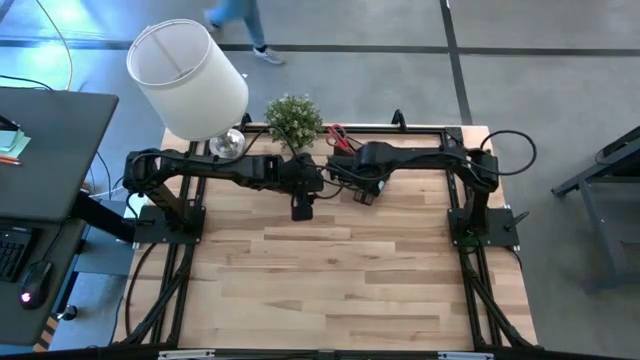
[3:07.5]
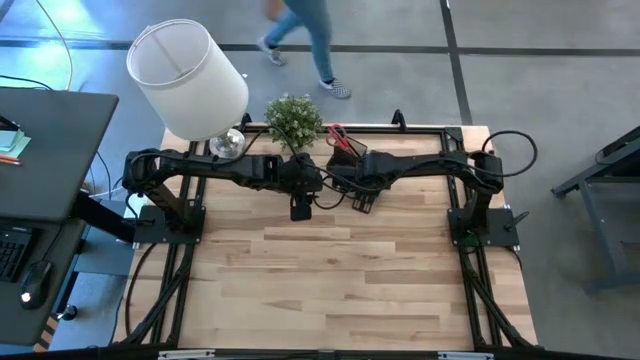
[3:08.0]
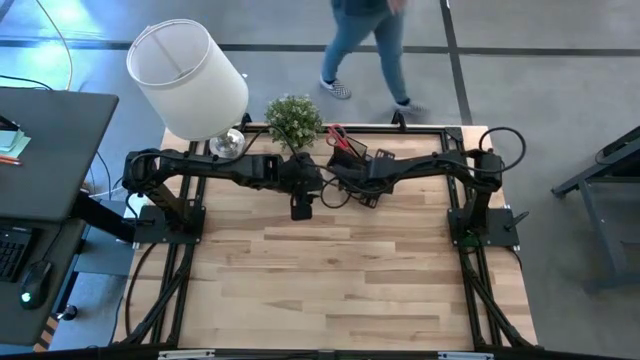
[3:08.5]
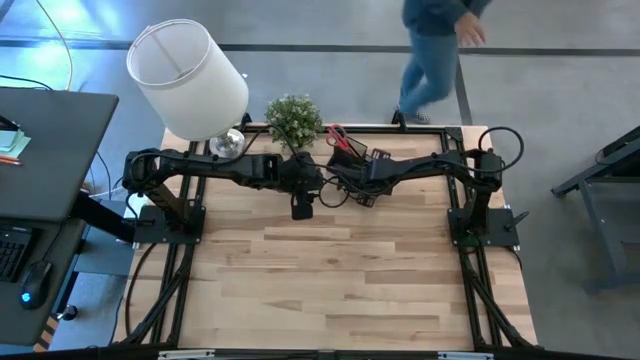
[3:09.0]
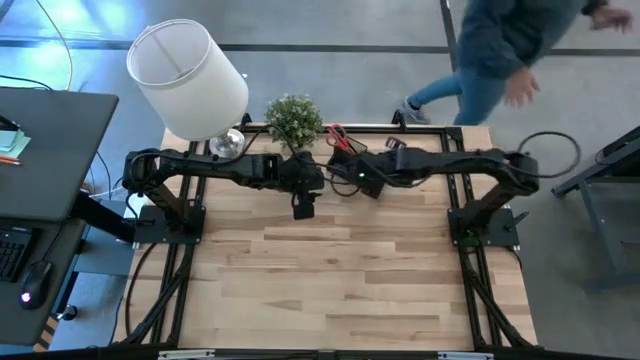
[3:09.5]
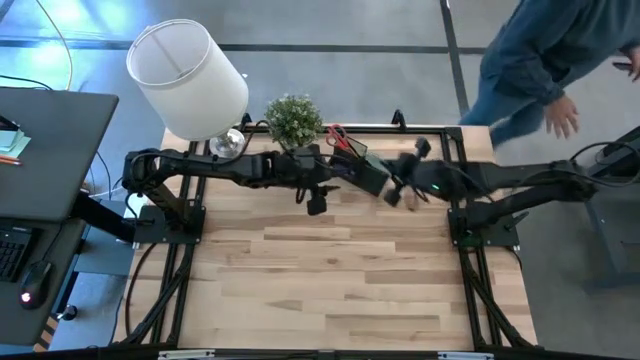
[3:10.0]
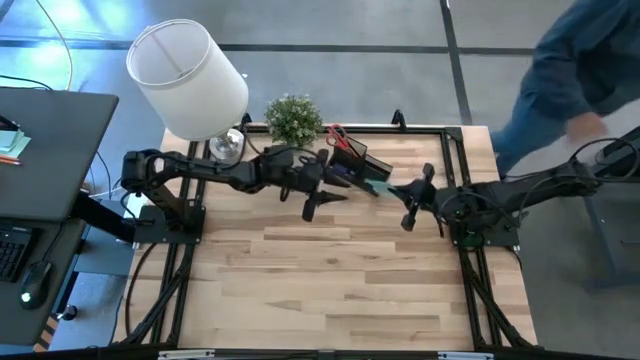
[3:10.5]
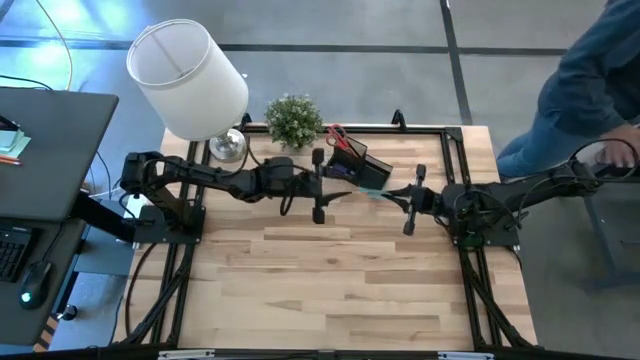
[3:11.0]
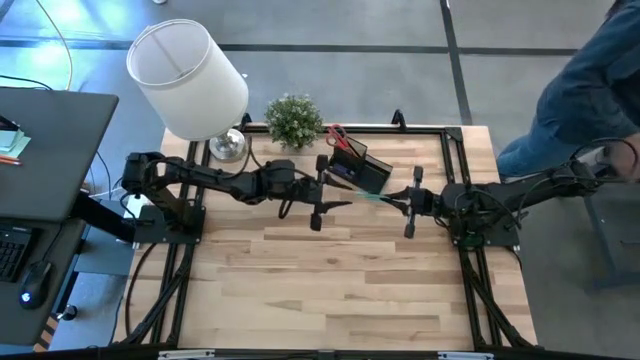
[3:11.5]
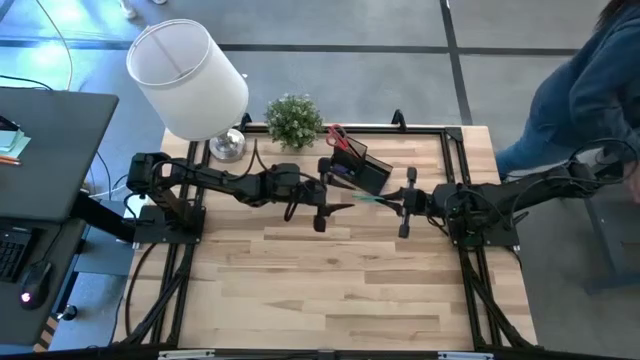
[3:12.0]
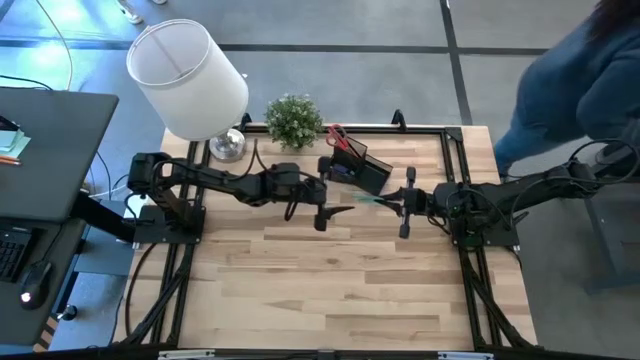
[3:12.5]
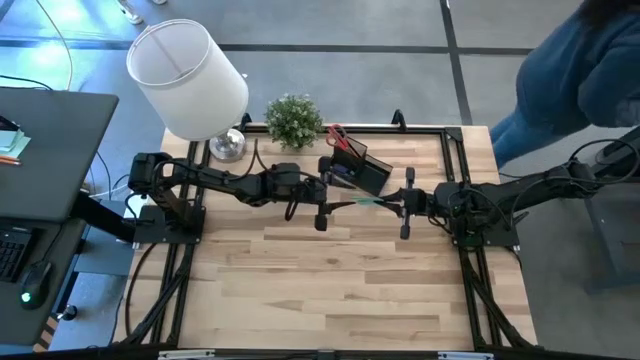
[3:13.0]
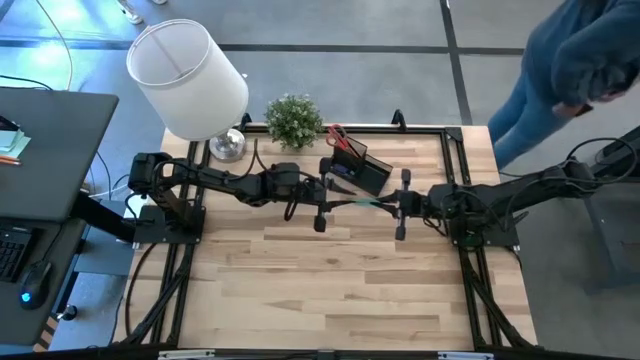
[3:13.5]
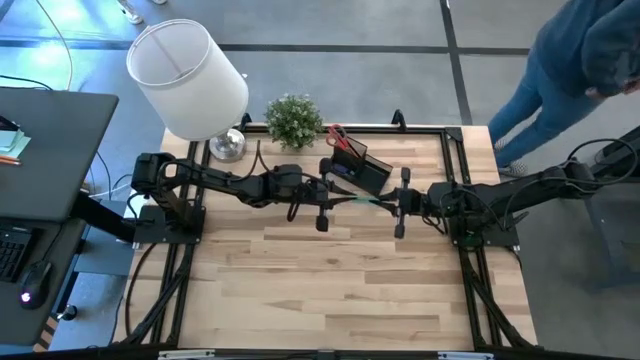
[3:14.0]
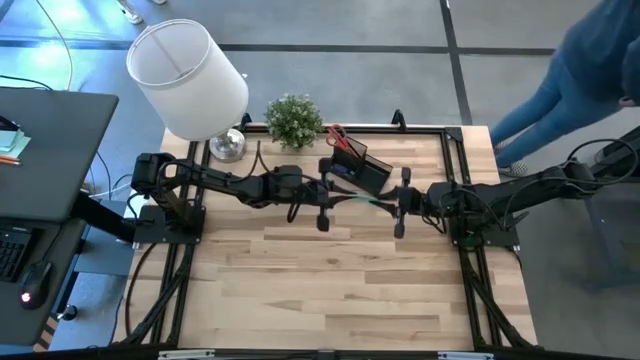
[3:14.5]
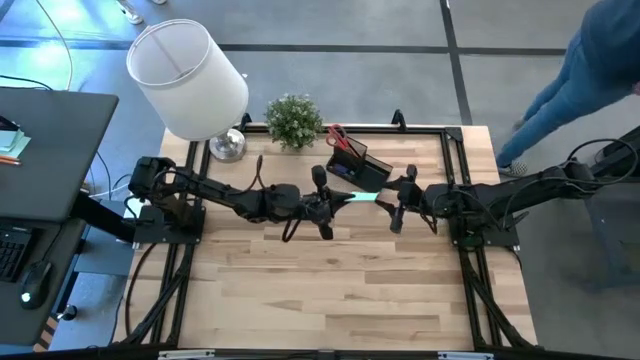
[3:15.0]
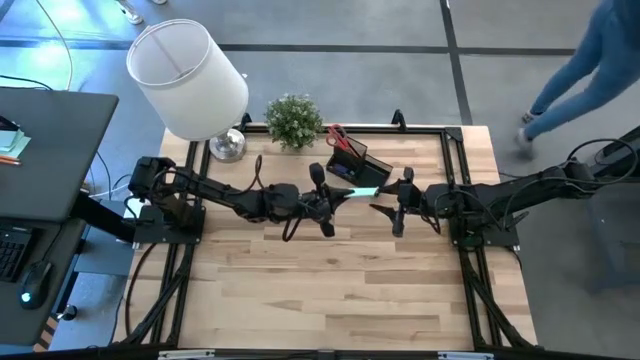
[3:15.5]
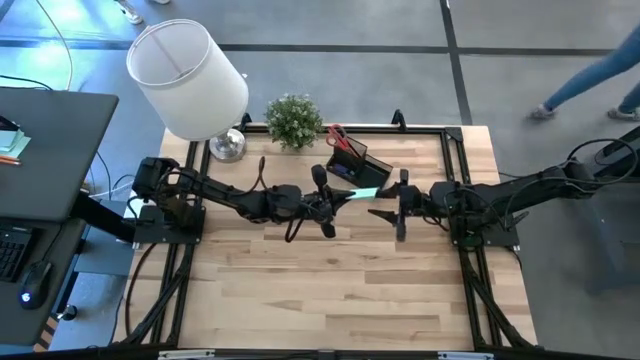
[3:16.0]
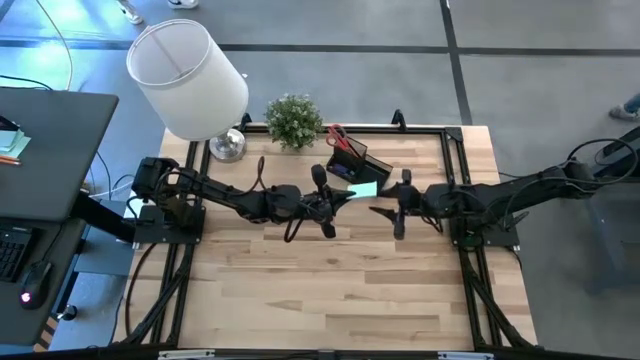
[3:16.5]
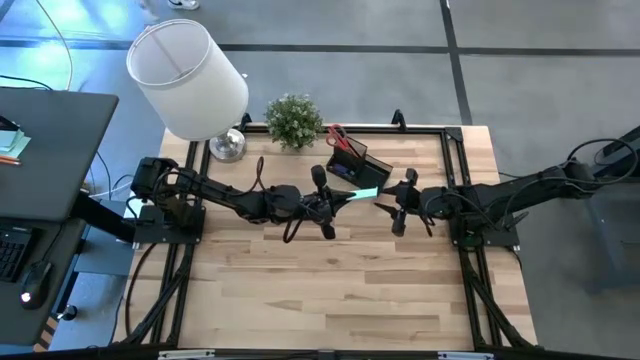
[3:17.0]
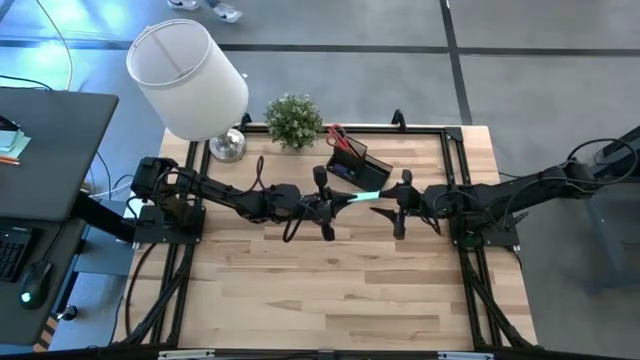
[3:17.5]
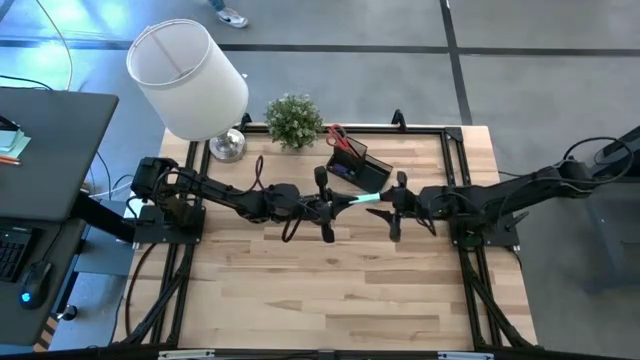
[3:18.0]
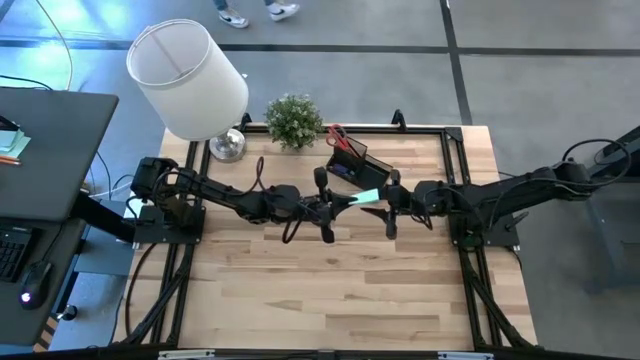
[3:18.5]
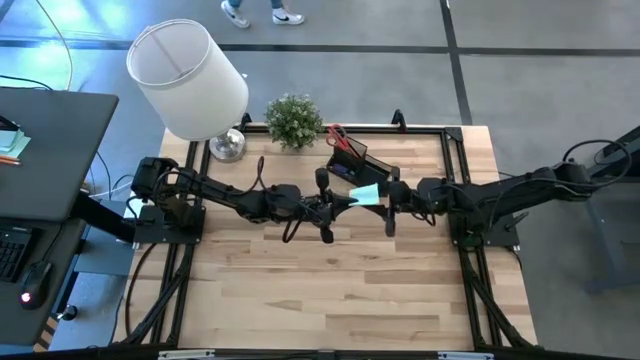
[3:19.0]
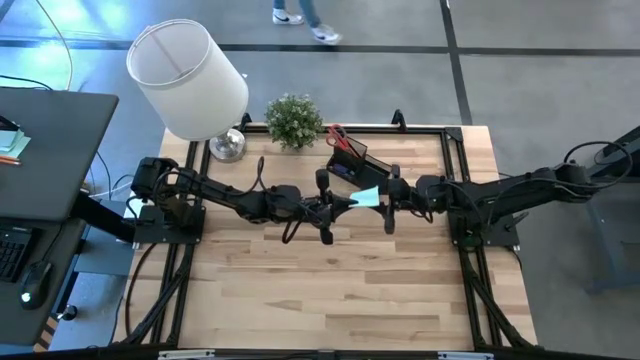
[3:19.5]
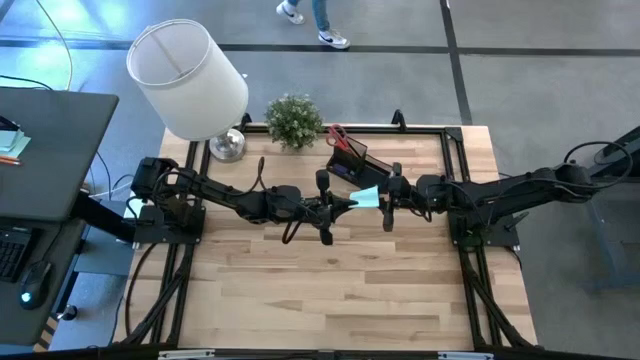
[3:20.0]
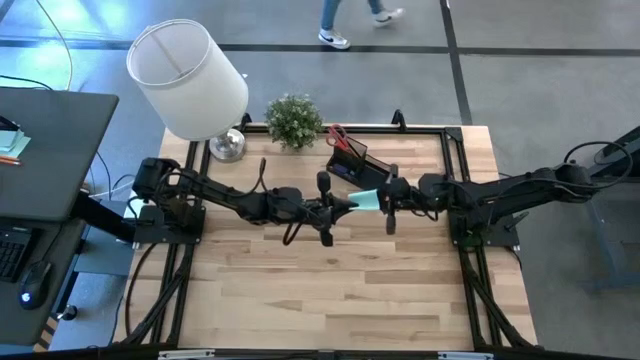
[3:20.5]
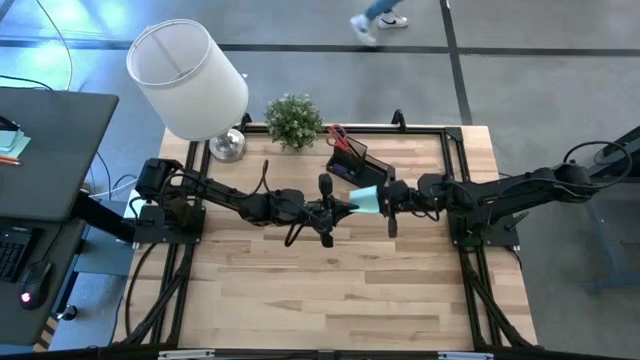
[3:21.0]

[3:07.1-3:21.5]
Task: Pick and place office supplies into organizer
Put the blue sticky notes in the black desk organizer

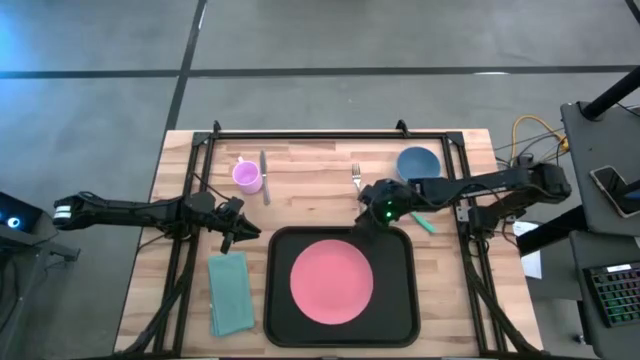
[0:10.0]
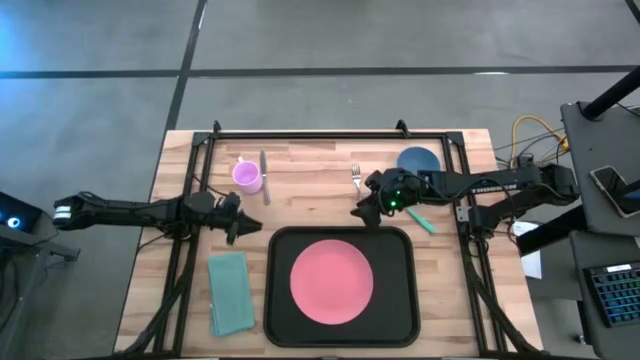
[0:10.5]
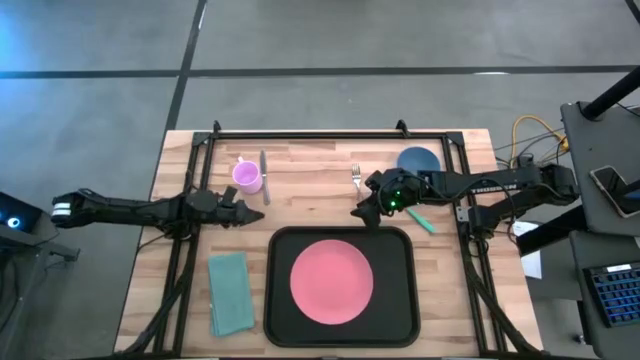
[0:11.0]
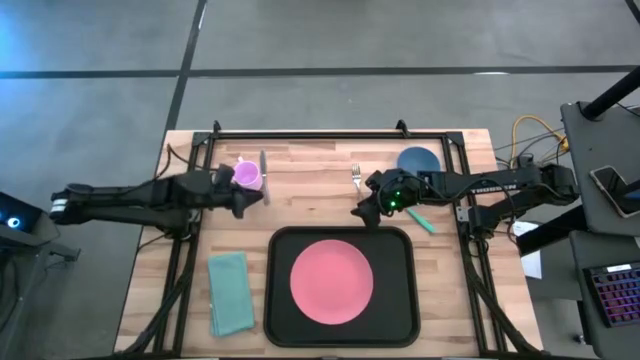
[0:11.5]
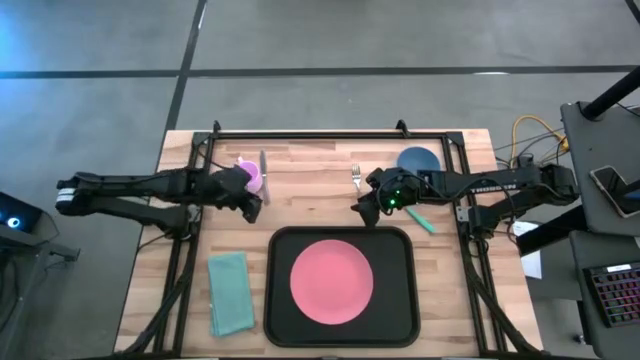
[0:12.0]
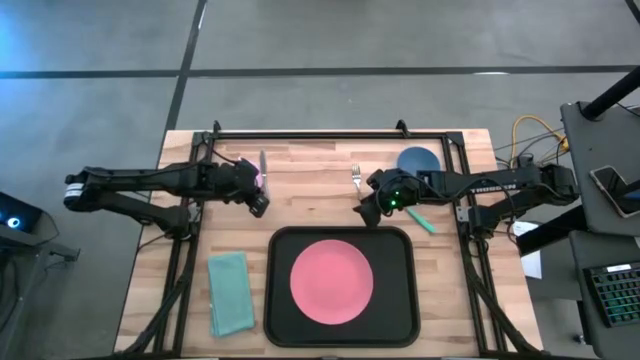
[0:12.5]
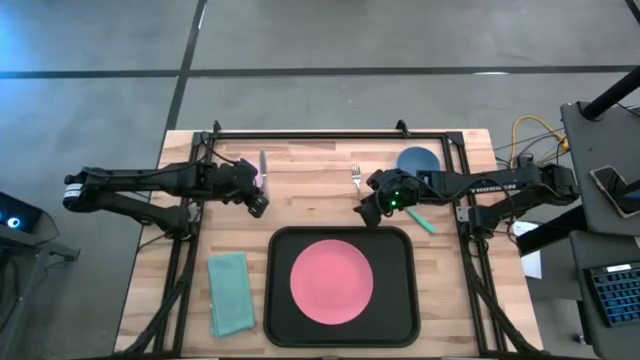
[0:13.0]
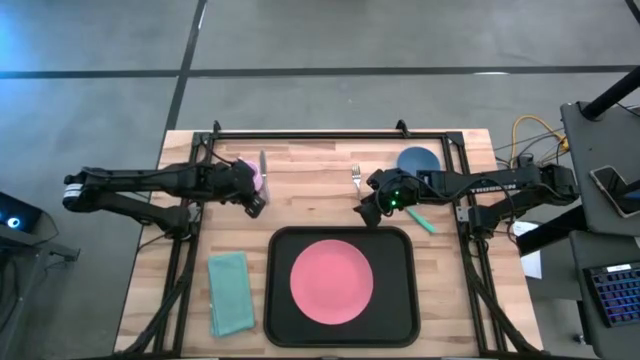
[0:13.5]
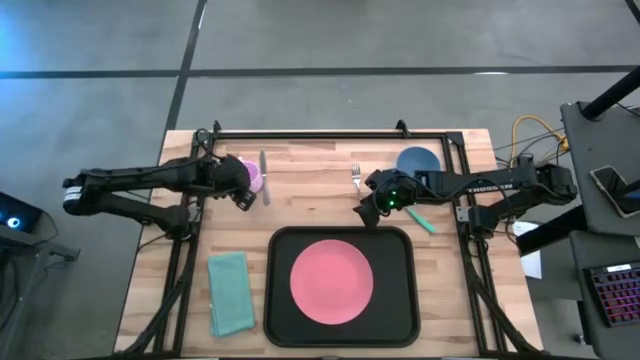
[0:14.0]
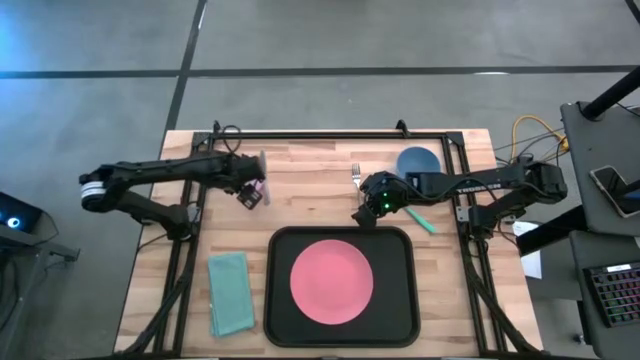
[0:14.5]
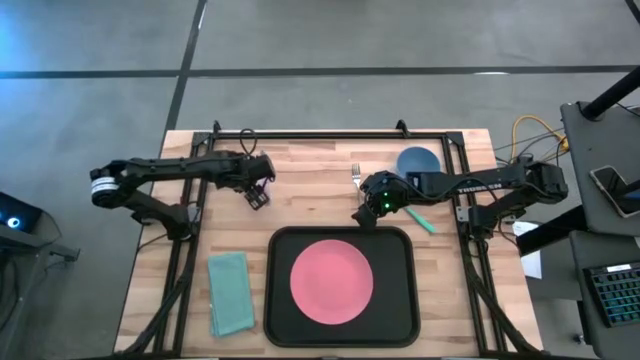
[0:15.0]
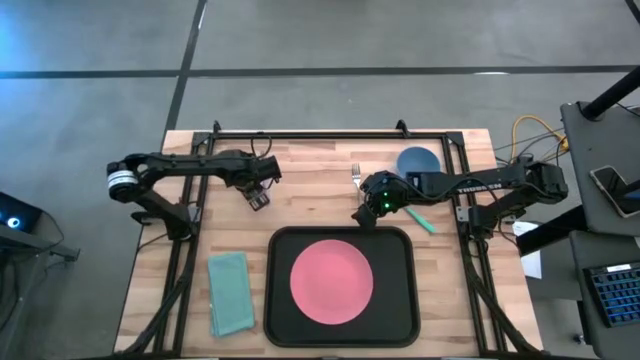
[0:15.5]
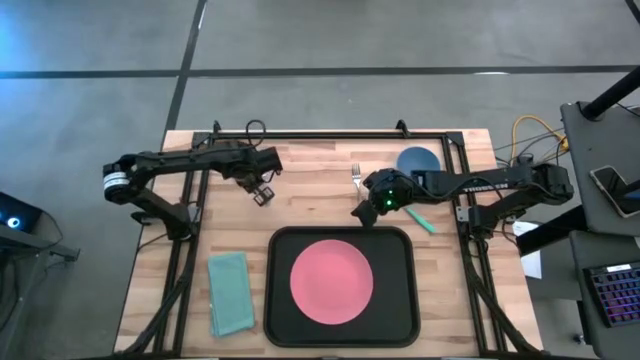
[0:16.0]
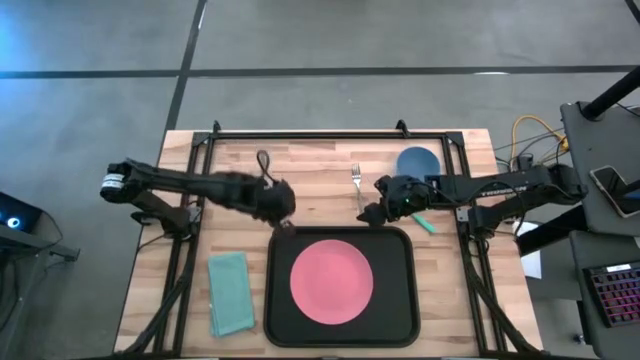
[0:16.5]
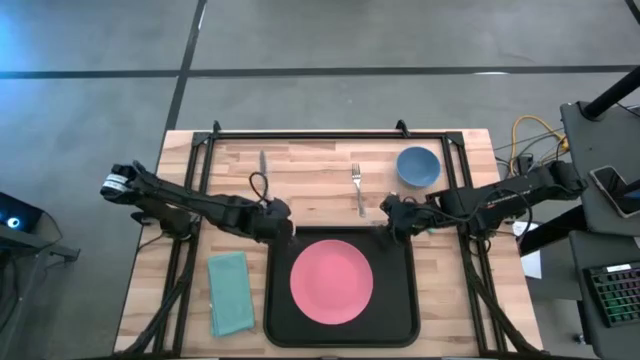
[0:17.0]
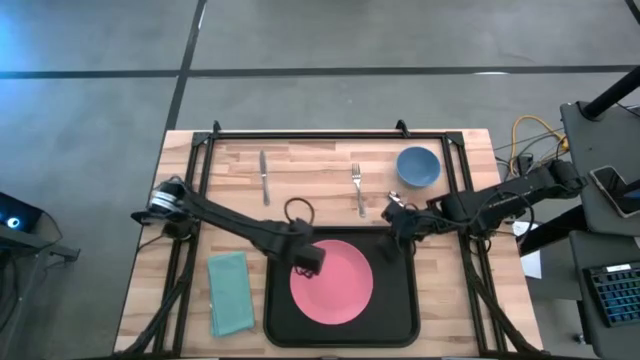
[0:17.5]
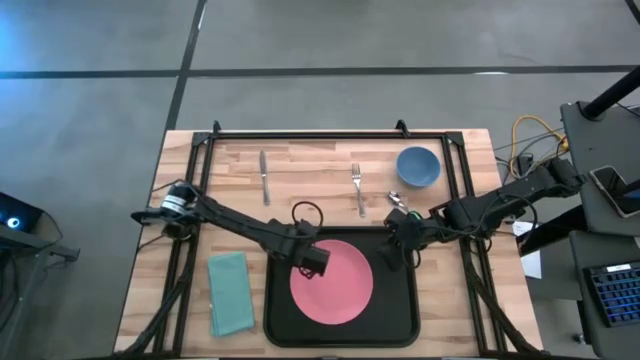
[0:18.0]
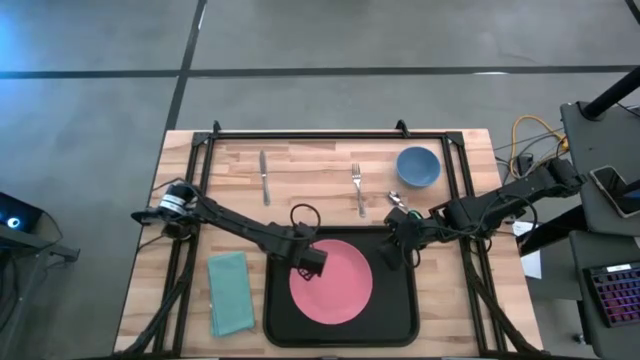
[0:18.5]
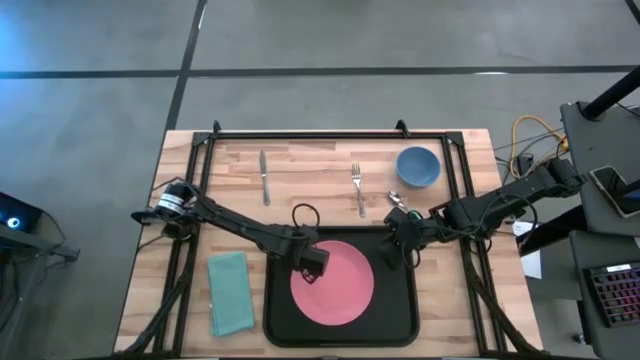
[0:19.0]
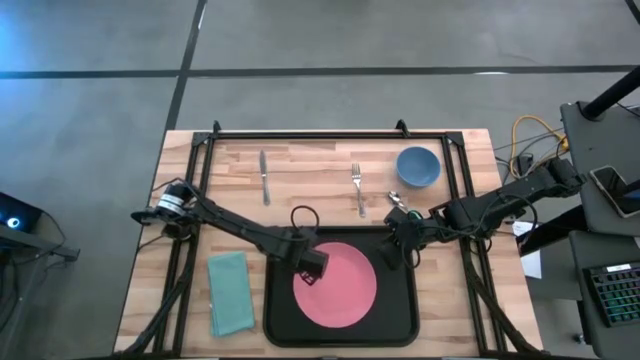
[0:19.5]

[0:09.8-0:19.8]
Task: Set up tray
Put the purple mug to the top left of the pink plate on the black tray
